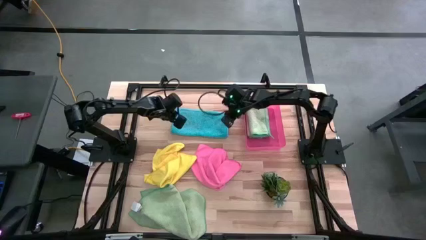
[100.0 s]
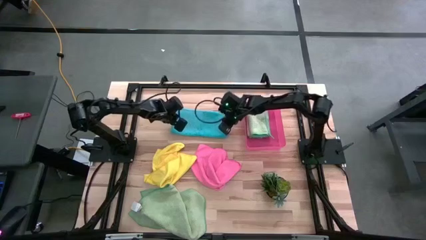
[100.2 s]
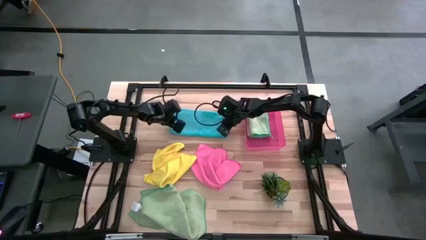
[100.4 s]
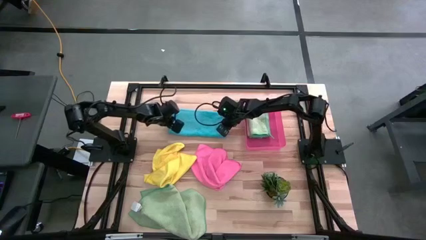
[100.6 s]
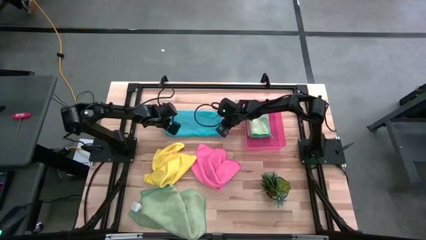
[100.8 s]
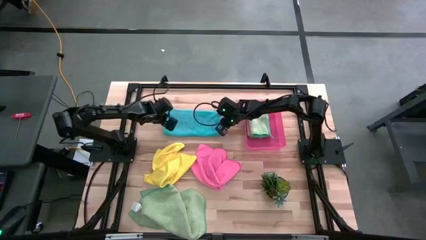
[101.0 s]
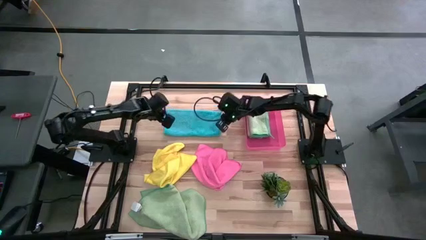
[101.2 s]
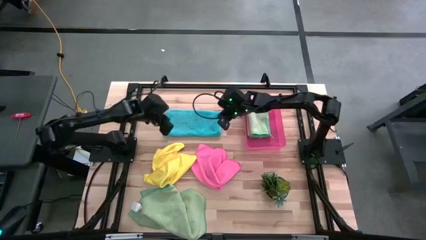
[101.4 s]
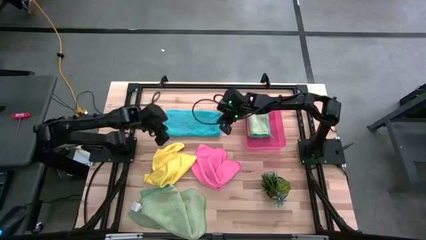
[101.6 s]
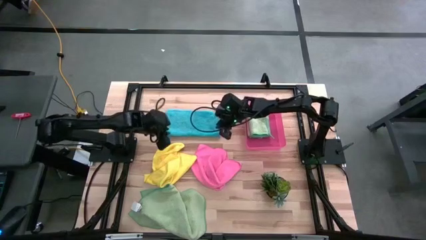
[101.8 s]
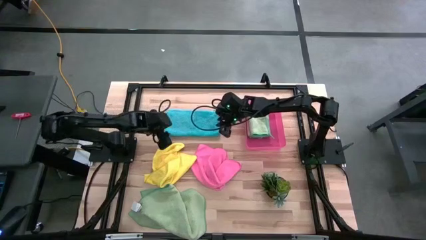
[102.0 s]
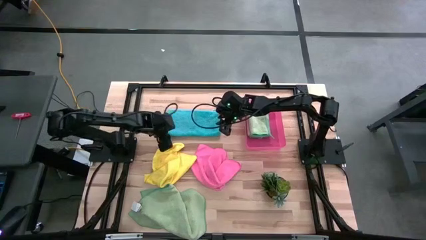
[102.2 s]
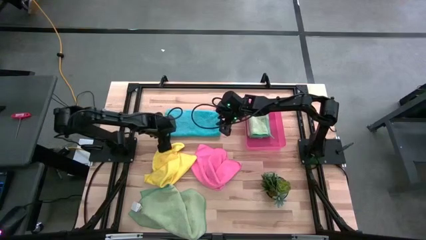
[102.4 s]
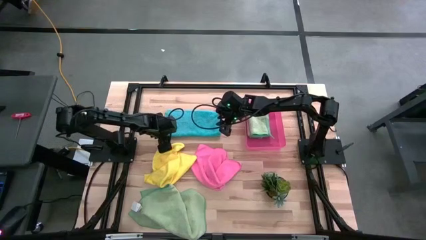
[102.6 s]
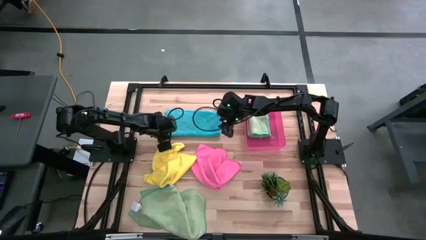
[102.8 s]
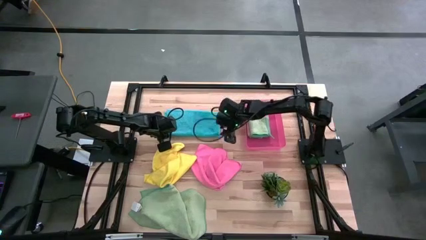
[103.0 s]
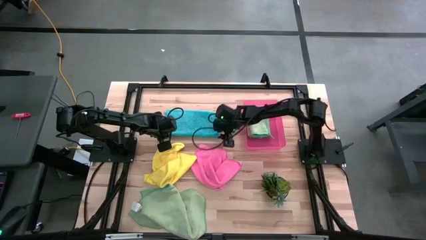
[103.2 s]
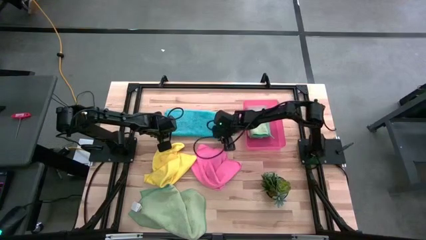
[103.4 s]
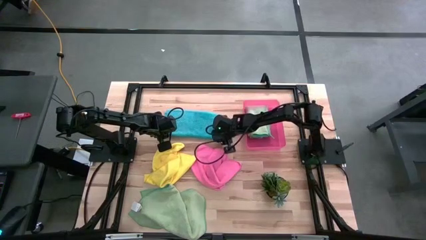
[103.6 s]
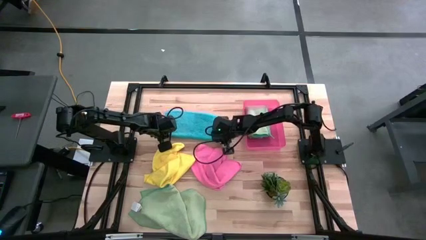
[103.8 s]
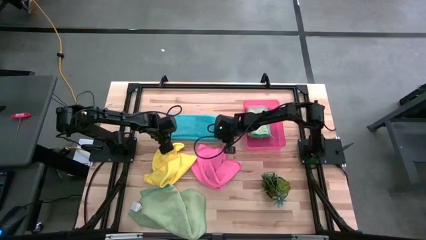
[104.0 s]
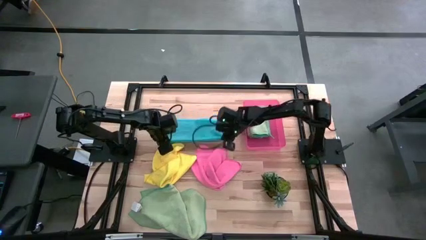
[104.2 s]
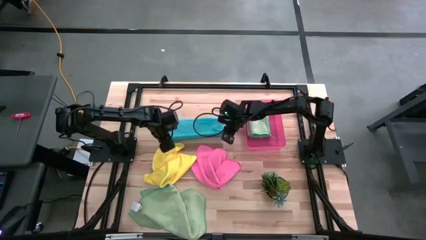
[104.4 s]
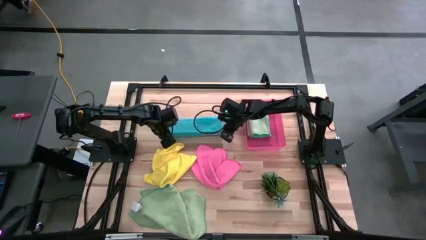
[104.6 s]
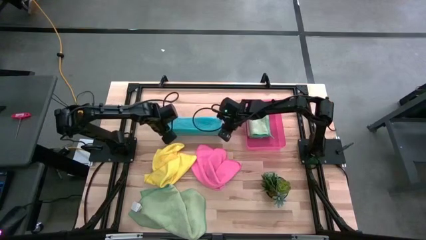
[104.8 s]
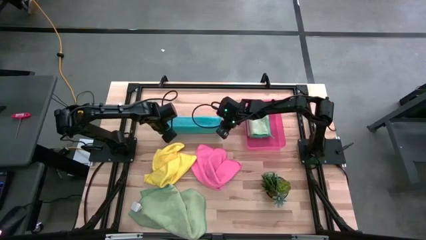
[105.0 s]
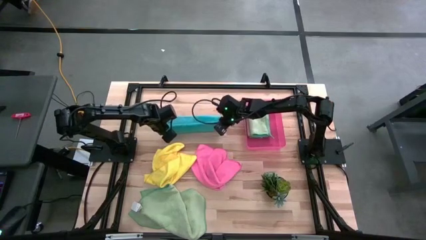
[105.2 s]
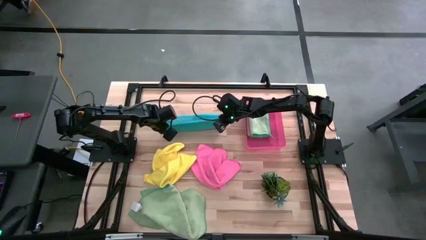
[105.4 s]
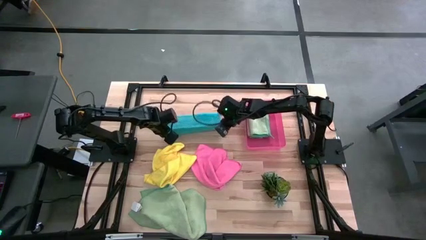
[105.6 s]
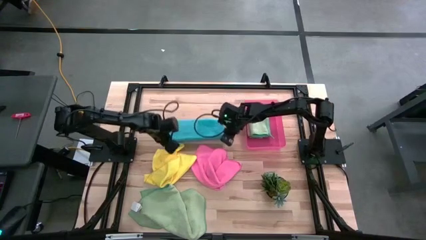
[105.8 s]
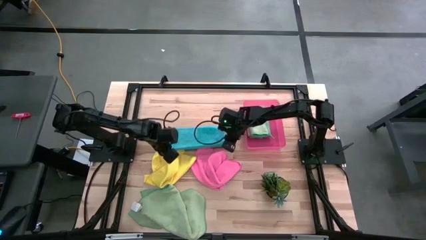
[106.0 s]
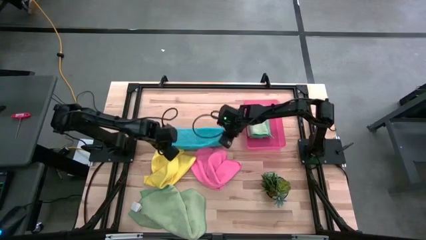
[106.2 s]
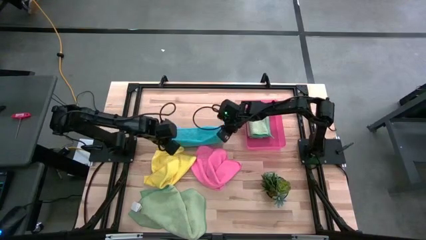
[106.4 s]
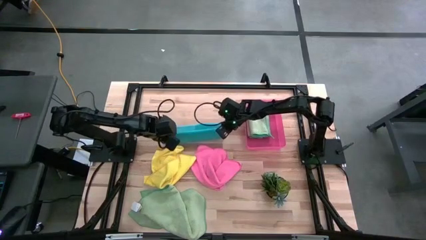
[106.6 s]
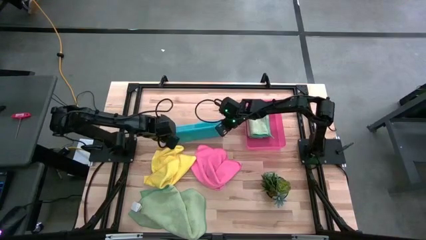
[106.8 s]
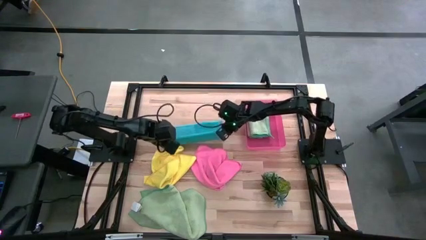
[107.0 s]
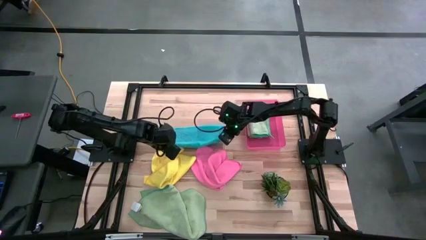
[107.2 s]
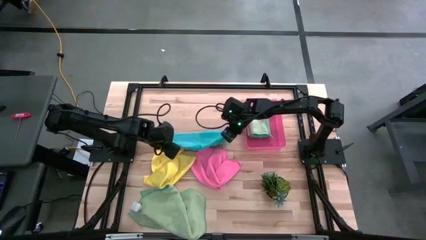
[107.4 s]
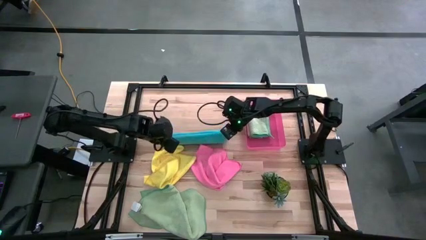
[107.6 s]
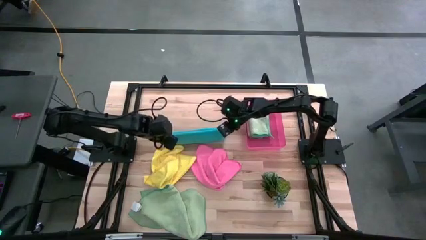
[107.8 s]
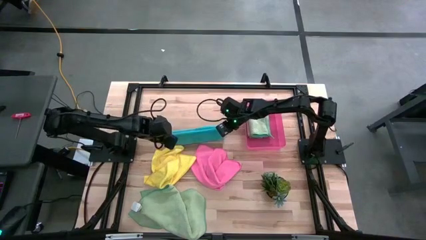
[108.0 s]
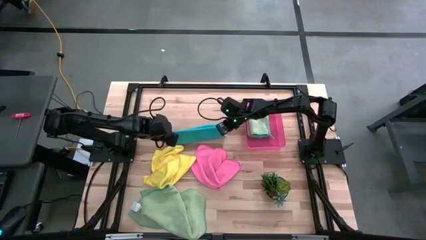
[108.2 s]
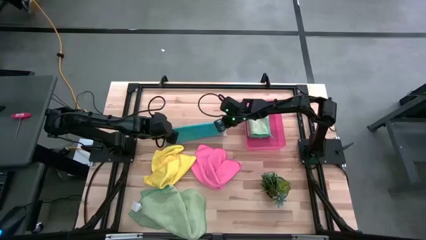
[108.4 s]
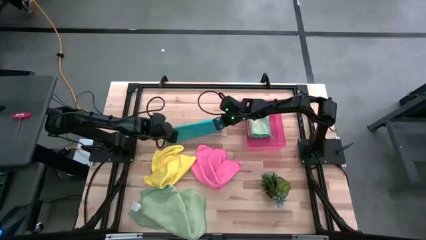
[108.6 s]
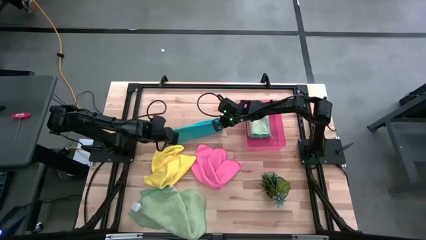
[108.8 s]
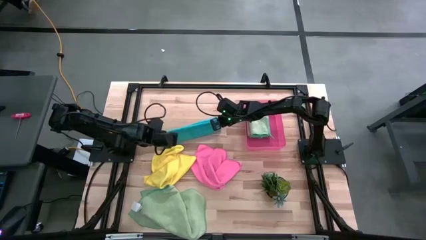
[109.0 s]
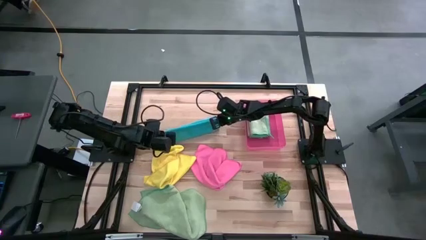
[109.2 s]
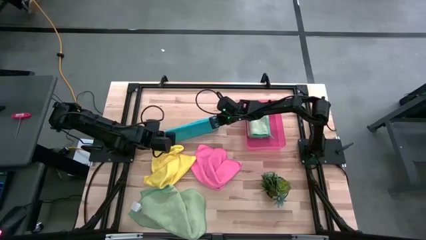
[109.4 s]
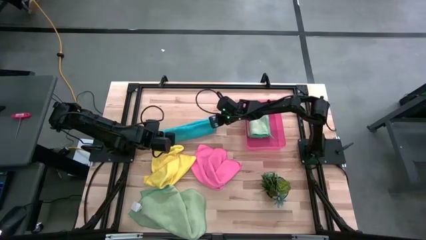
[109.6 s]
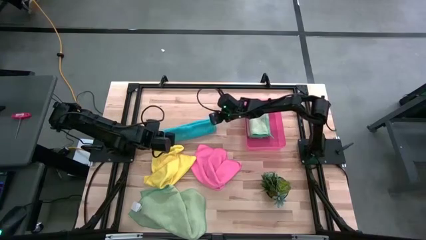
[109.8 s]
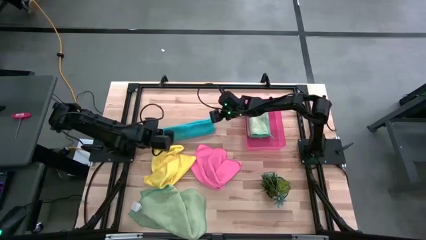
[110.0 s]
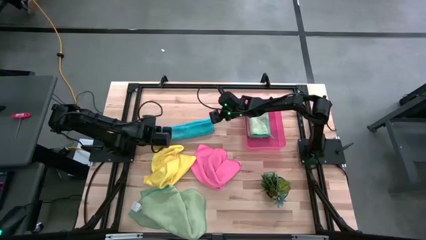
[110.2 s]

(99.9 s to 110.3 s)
Task: Fold microfiber towels
Fold the blue microfiber cloth

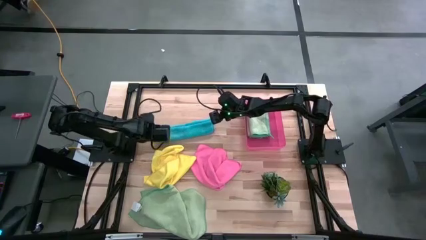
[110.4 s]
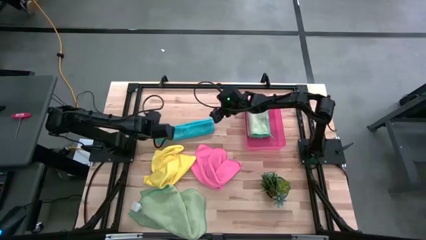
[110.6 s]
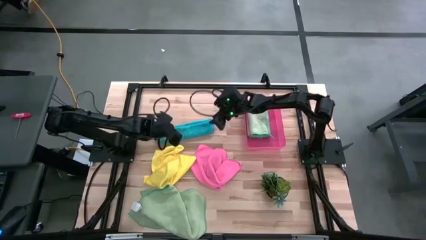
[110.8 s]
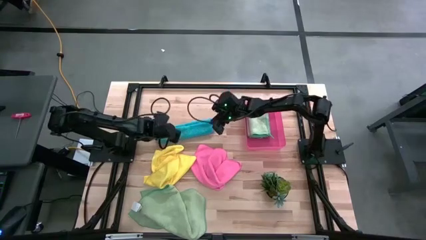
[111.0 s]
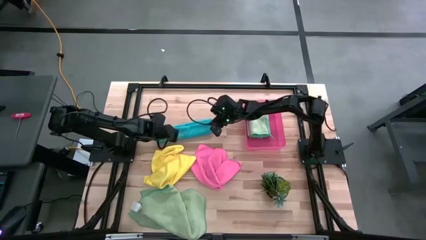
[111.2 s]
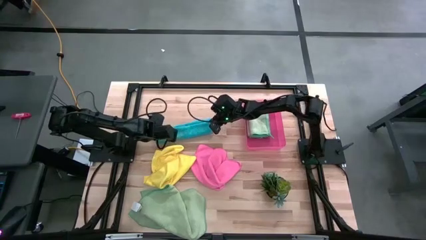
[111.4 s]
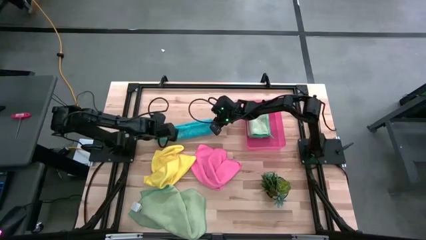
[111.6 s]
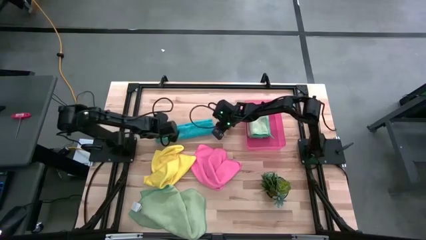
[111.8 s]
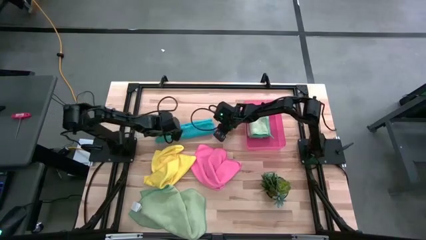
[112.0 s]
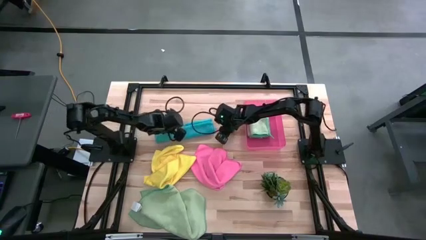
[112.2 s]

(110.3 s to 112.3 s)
Fold the blue microfiber cloth

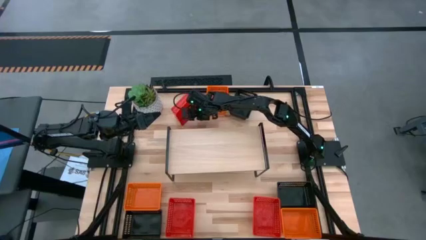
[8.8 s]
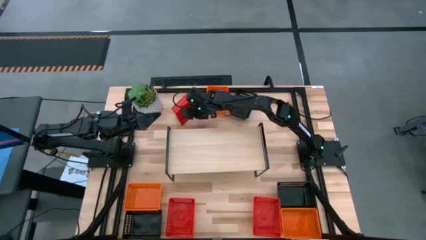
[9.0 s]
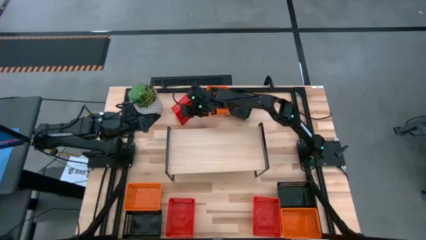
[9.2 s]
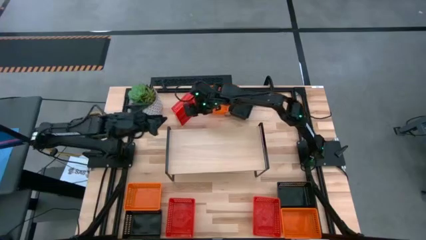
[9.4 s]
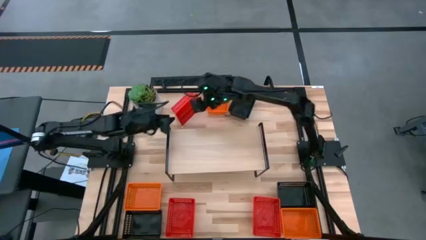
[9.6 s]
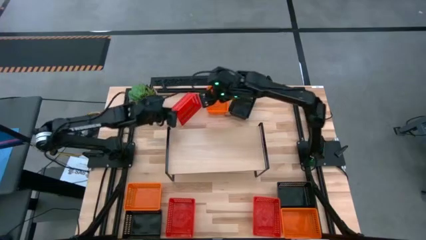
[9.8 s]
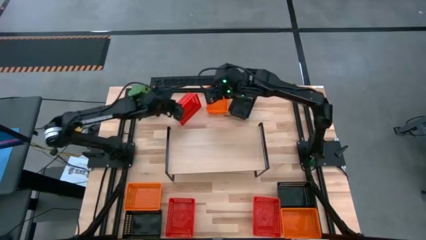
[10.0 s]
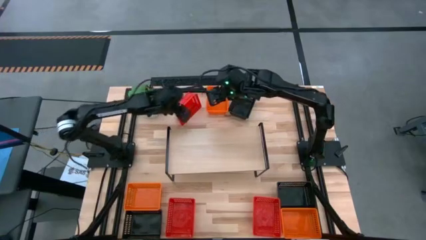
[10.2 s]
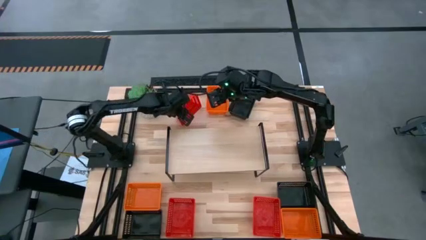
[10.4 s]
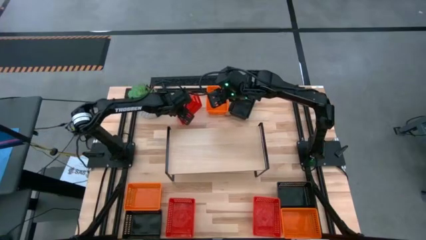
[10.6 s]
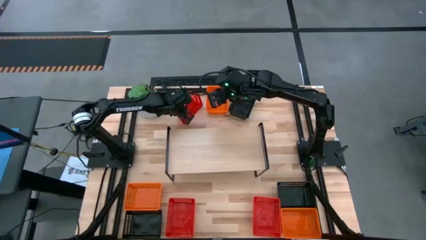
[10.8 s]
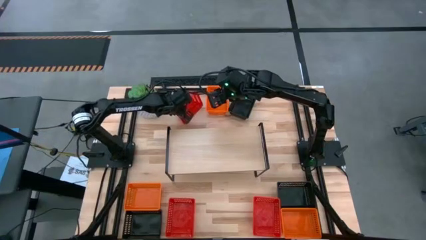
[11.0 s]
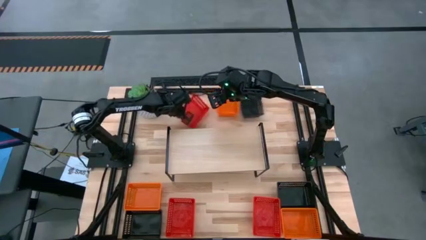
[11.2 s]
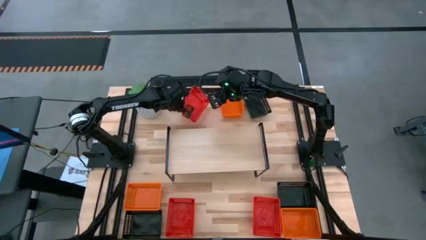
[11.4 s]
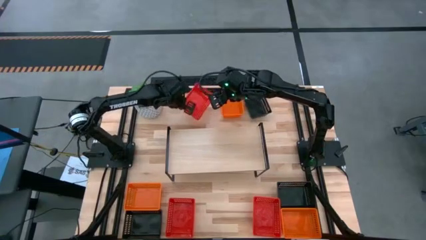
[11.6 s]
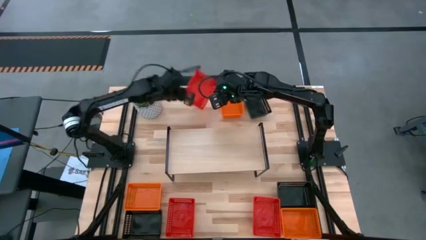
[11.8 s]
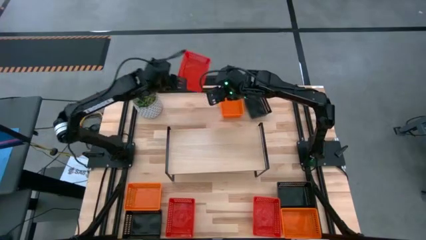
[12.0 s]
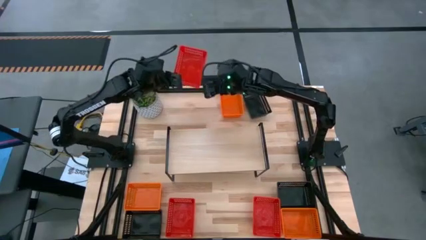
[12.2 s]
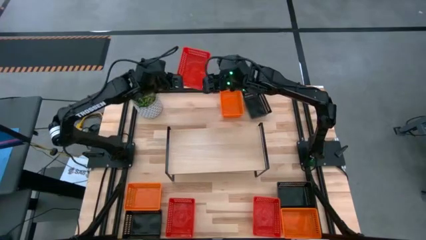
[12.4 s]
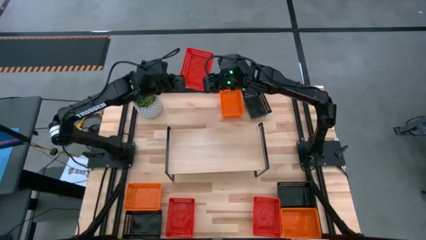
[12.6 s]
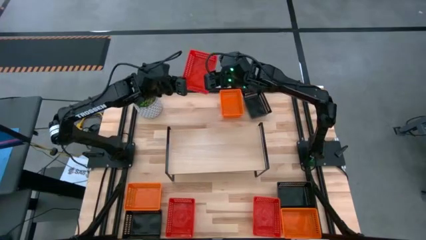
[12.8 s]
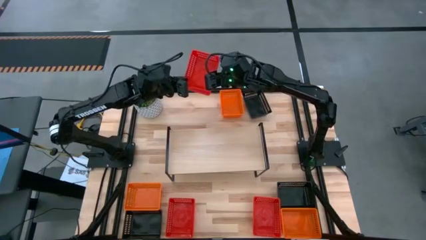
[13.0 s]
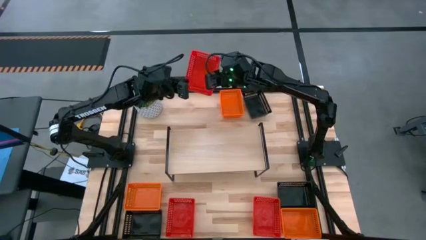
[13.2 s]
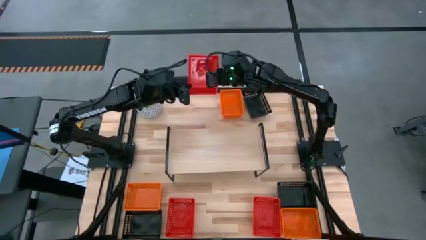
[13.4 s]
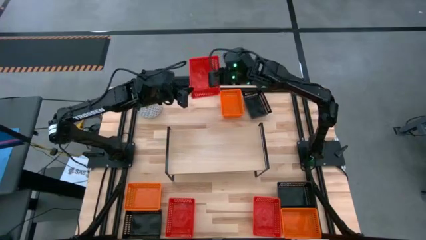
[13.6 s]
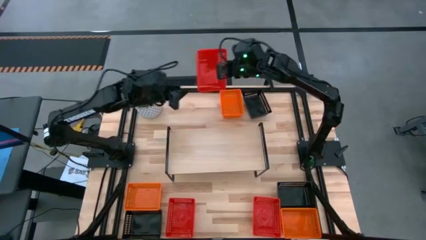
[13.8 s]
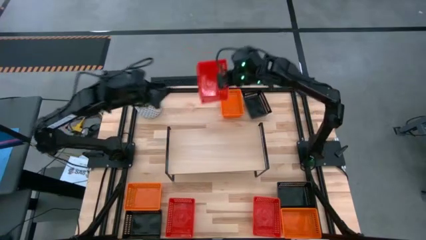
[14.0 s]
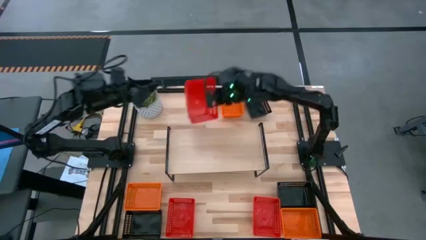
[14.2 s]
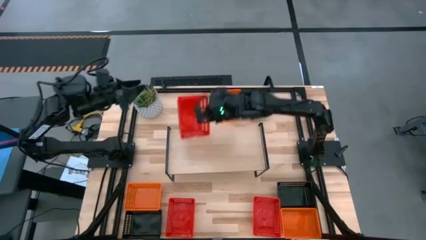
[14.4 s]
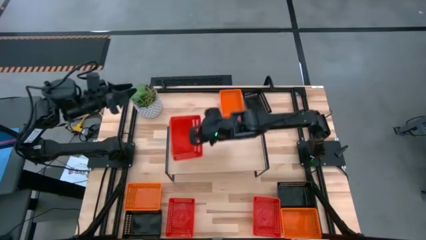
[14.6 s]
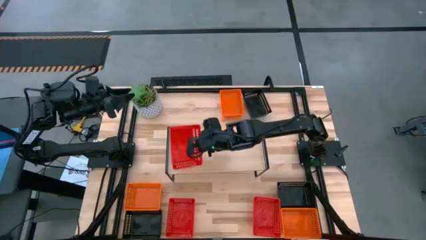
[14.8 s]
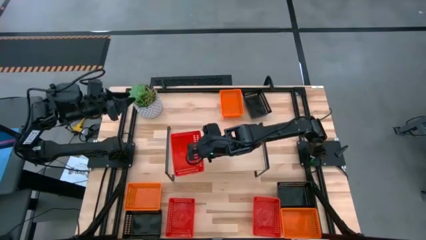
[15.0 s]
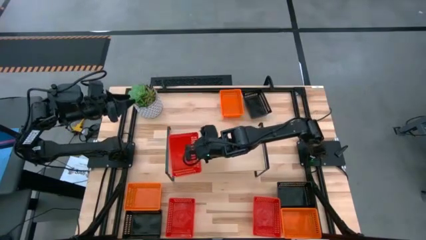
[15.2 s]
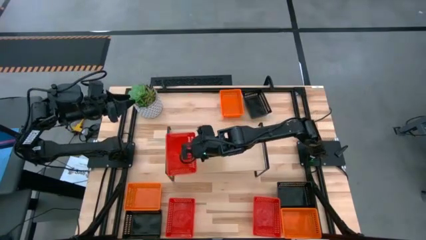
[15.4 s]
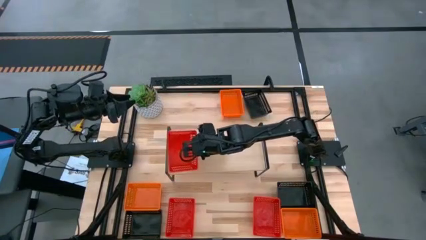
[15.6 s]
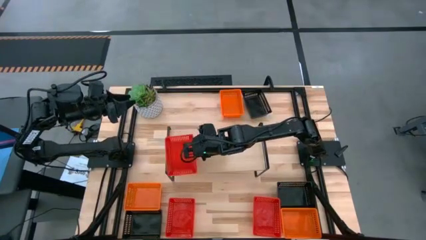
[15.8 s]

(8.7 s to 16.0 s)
Task: Stack baskets on shelf by color
Put the top red bin on the shelf
